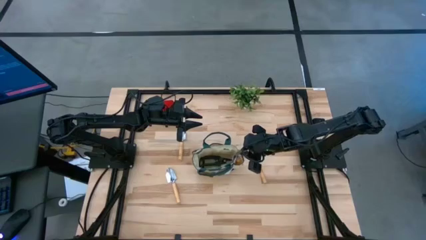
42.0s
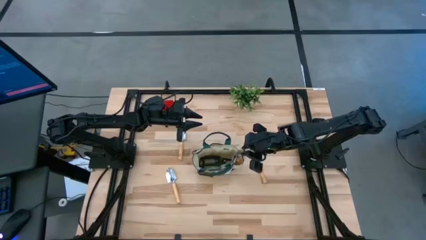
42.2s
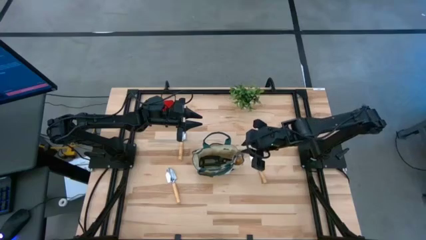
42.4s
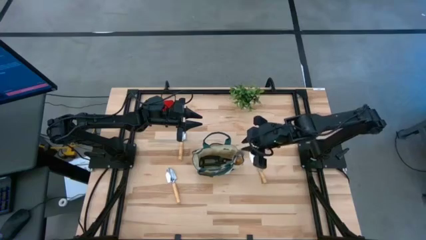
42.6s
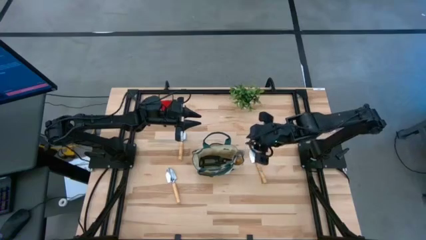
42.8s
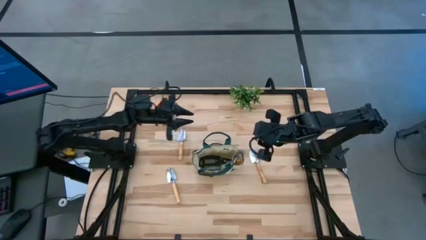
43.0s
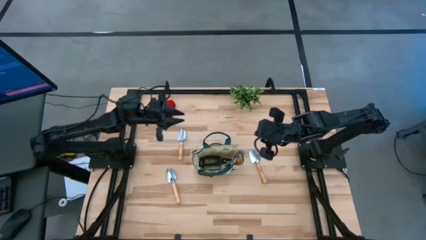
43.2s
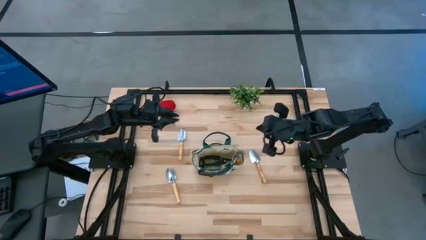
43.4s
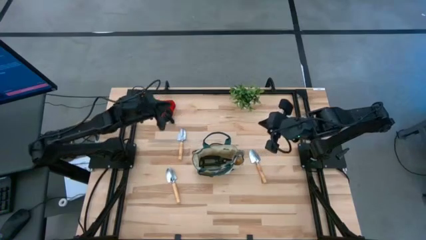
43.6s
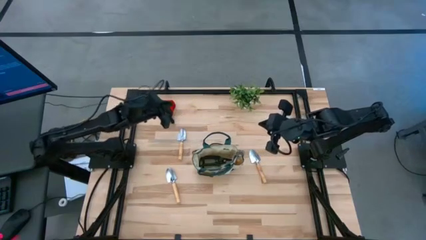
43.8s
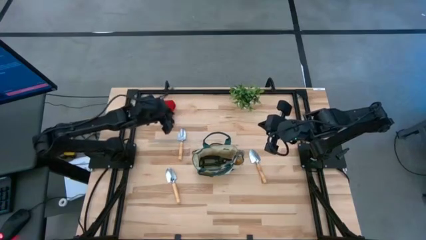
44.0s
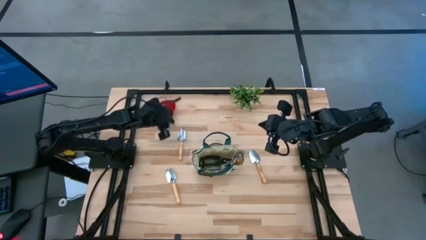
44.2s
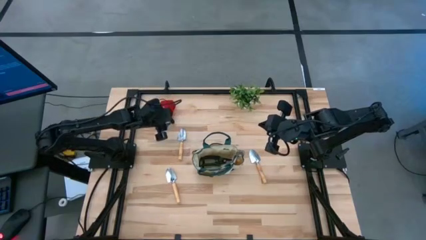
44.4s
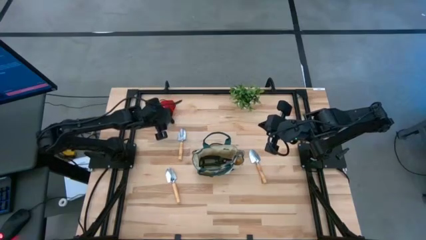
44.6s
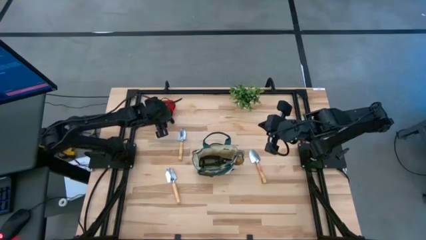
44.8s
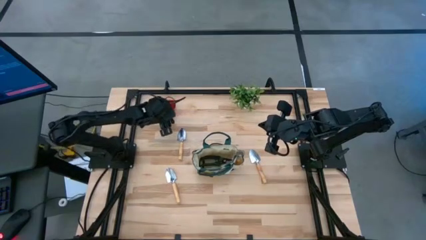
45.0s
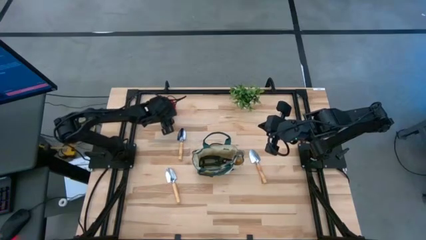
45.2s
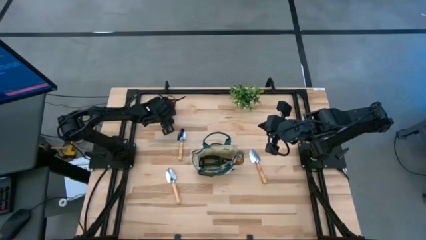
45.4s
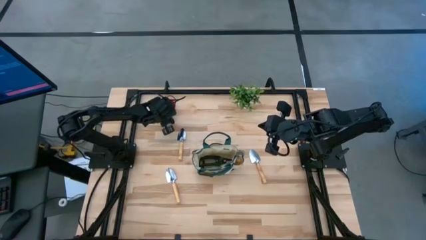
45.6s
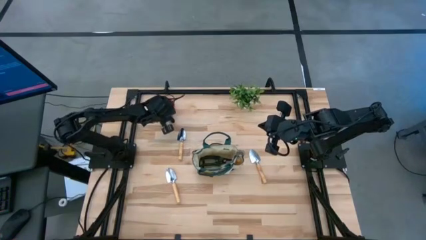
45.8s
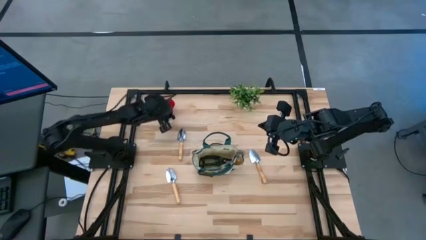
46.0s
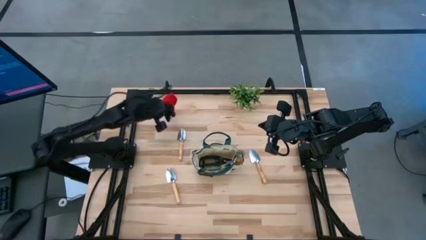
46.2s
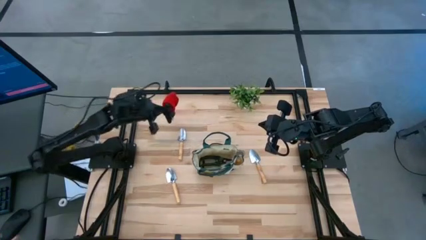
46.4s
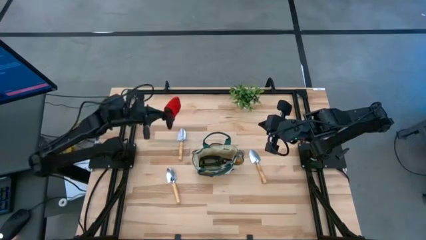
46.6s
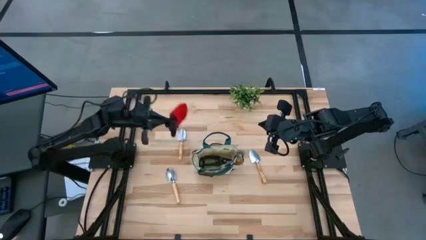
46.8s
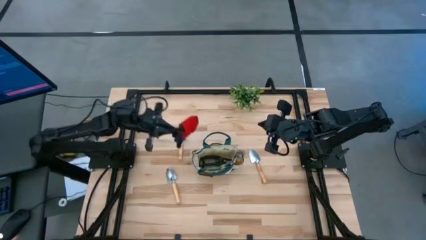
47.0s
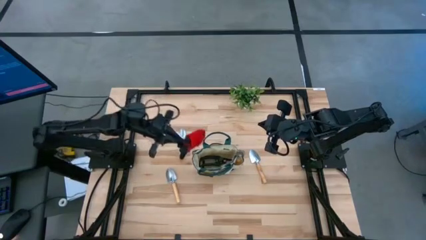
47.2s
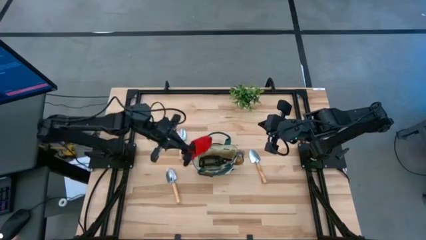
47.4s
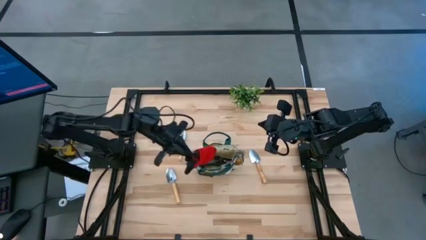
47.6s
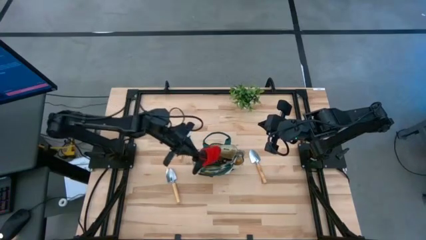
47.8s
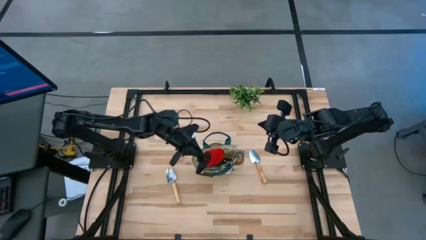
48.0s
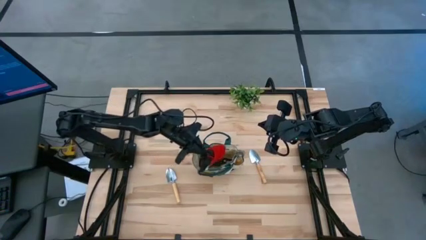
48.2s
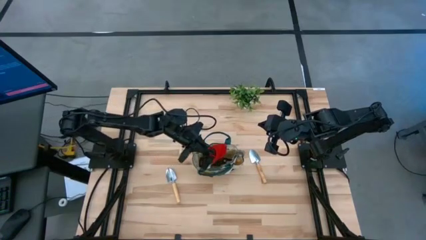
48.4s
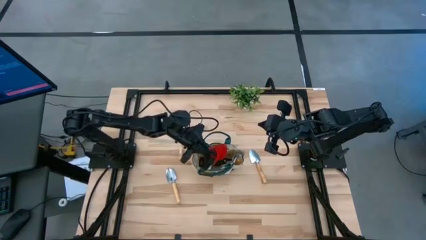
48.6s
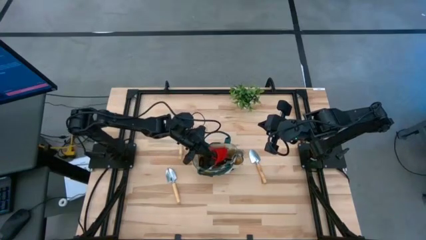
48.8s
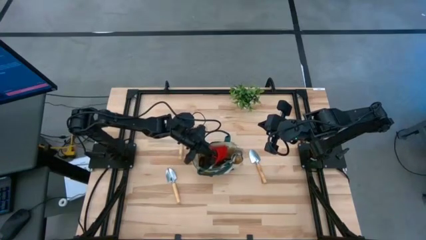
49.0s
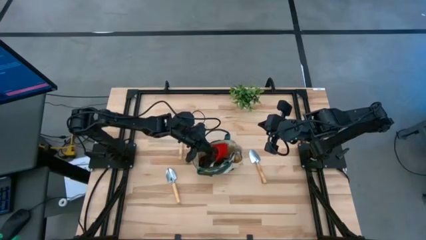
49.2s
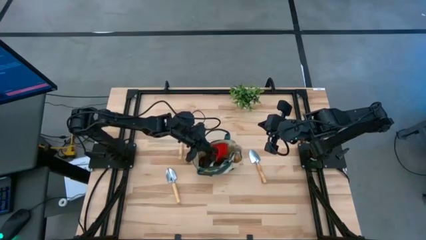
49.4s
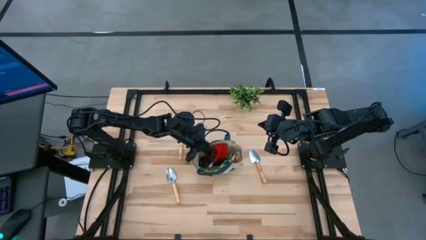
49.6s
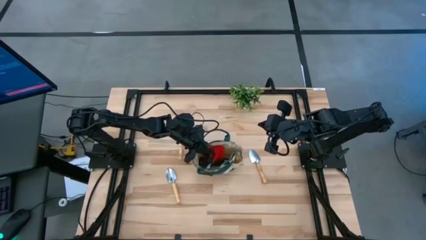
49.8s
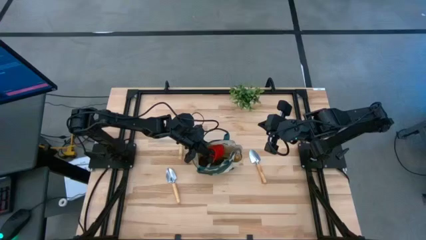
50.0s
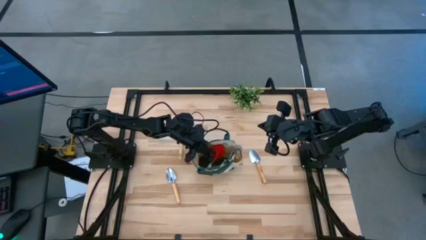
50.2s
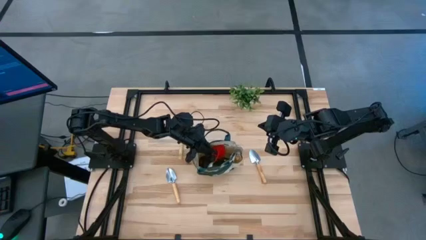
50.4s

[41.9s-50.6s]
Task: Pick & Place Garden tools in Gardening bag
Put the red gloves into the gardening bag

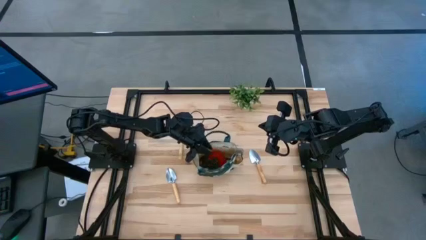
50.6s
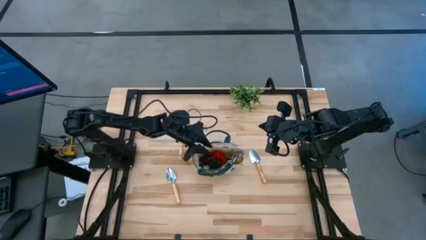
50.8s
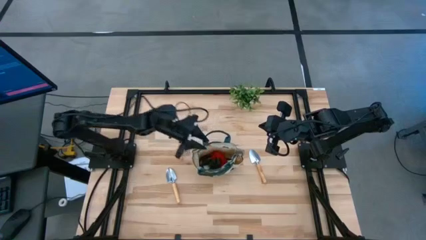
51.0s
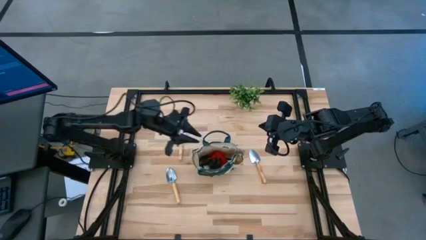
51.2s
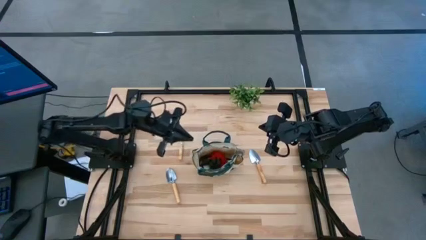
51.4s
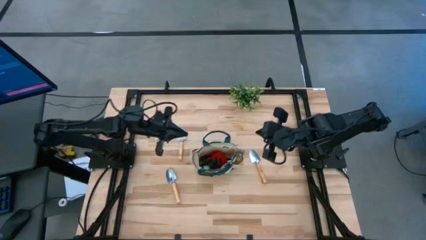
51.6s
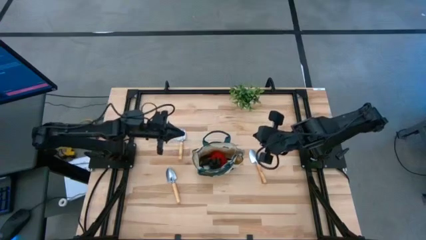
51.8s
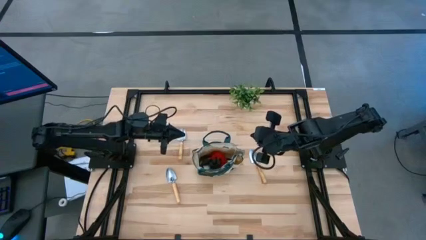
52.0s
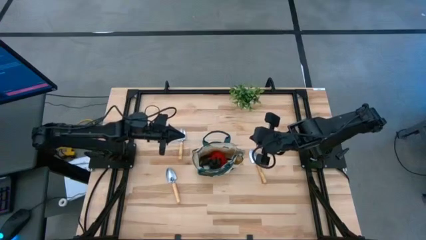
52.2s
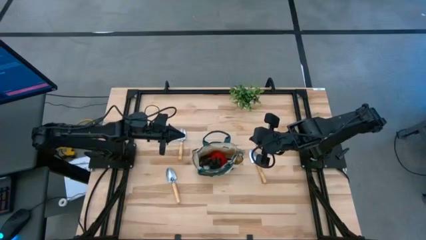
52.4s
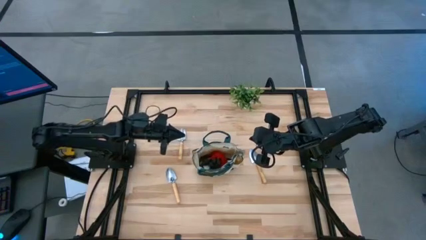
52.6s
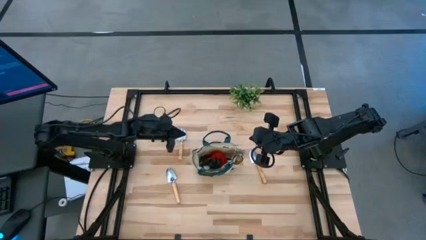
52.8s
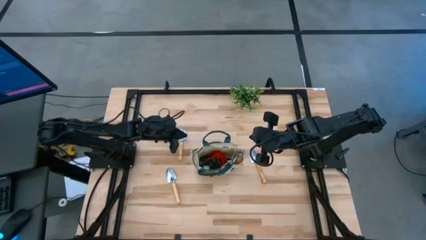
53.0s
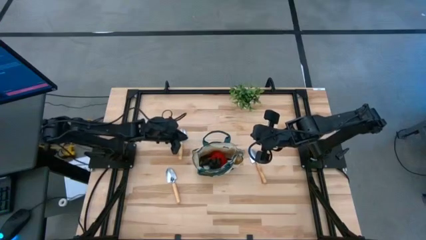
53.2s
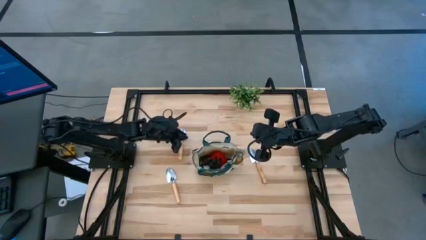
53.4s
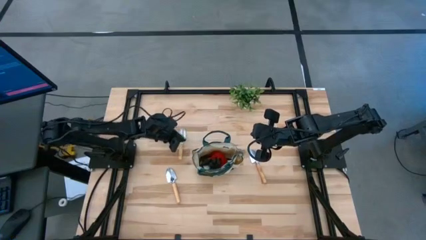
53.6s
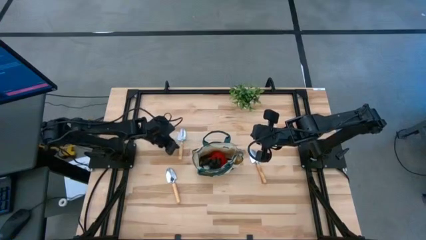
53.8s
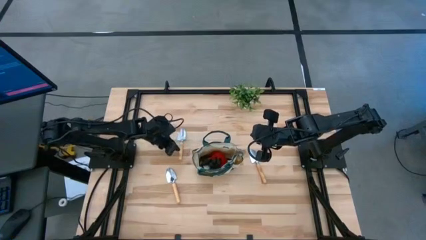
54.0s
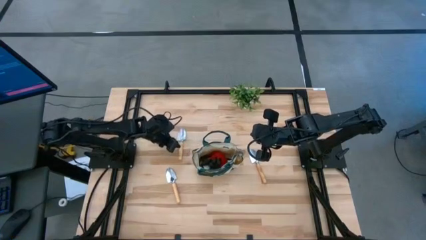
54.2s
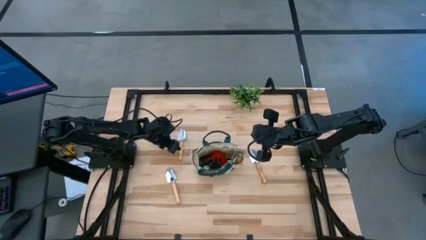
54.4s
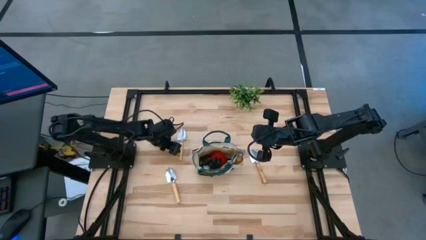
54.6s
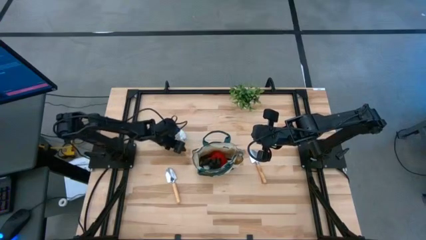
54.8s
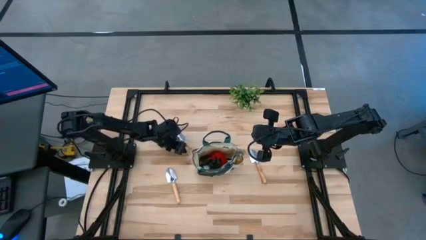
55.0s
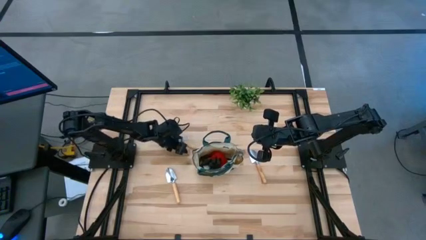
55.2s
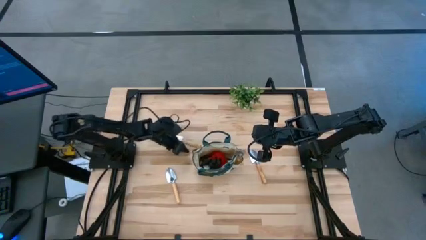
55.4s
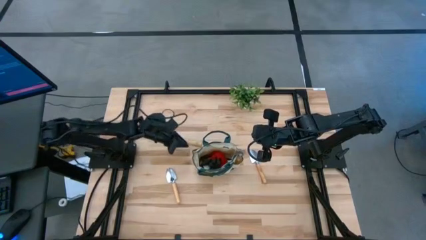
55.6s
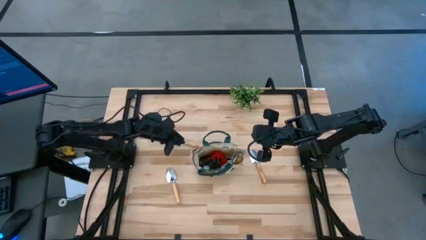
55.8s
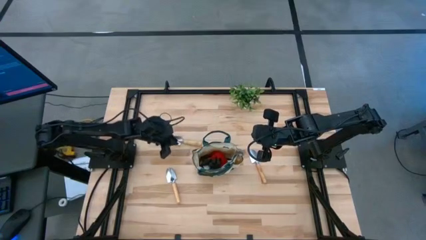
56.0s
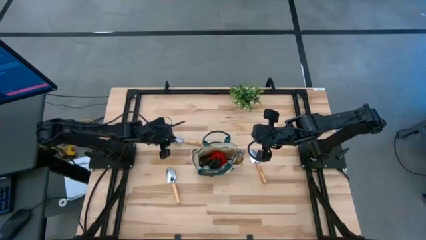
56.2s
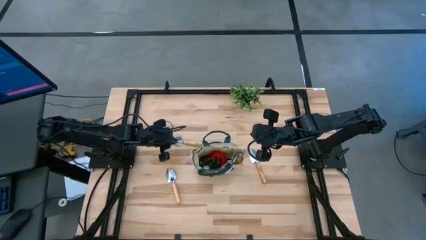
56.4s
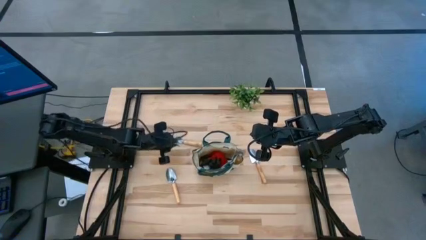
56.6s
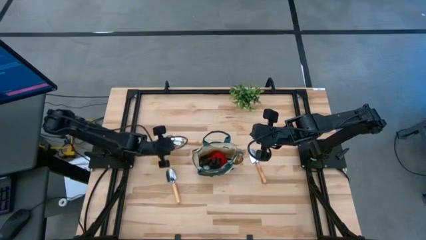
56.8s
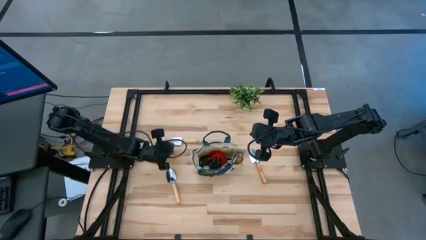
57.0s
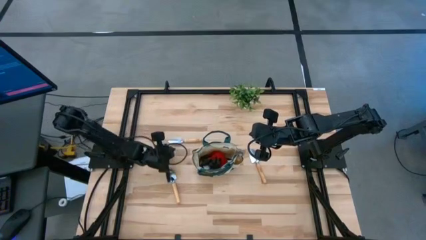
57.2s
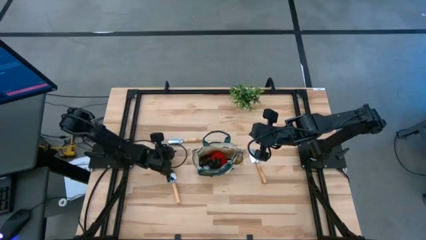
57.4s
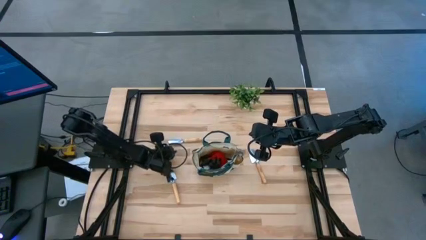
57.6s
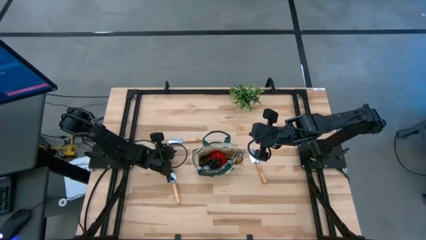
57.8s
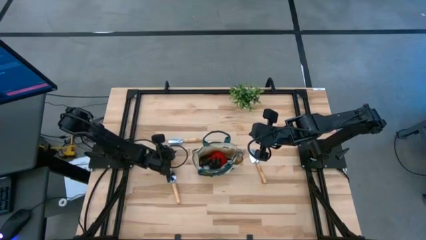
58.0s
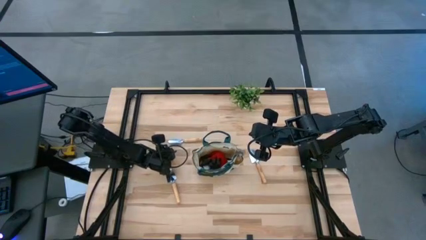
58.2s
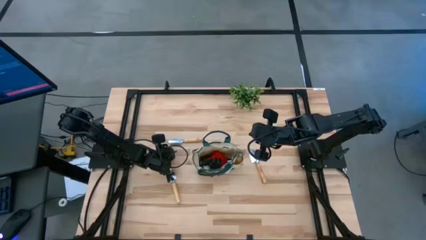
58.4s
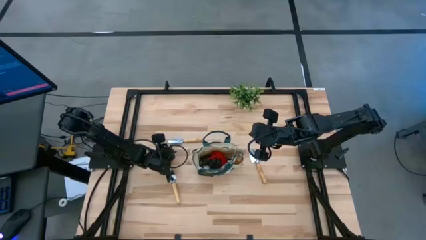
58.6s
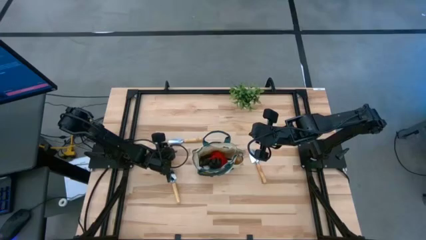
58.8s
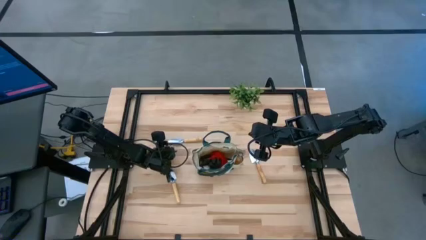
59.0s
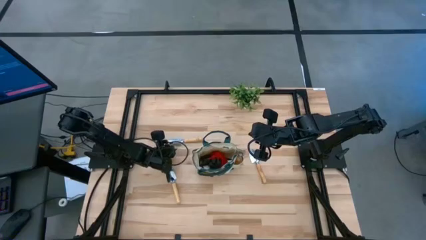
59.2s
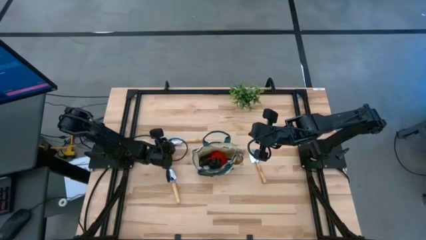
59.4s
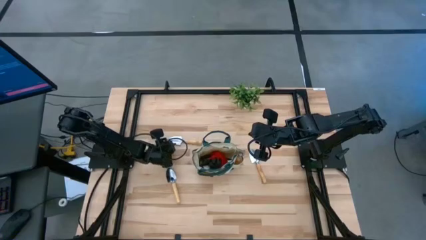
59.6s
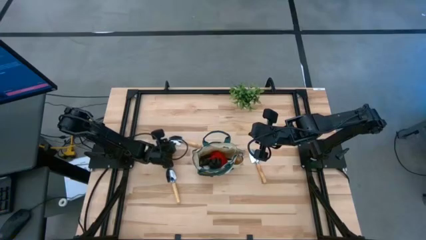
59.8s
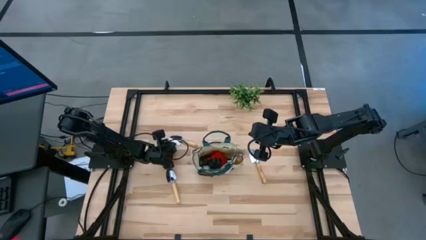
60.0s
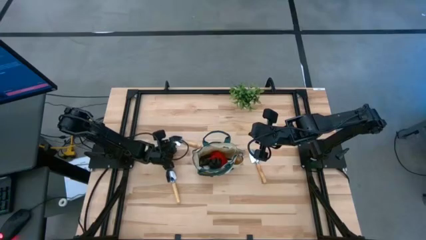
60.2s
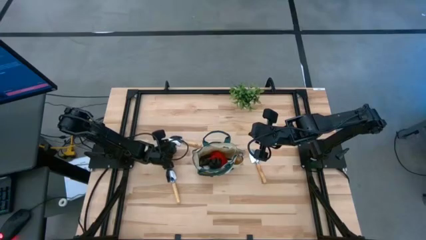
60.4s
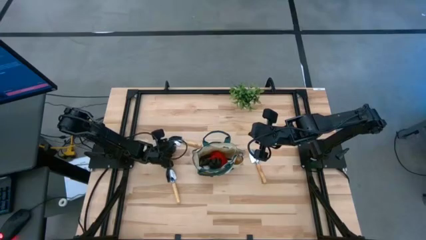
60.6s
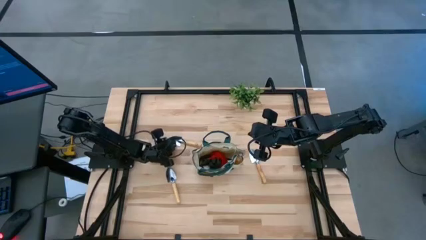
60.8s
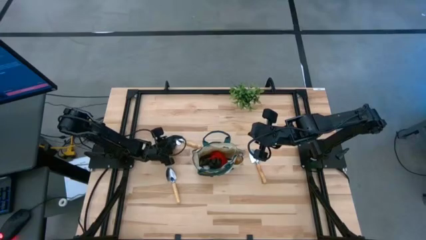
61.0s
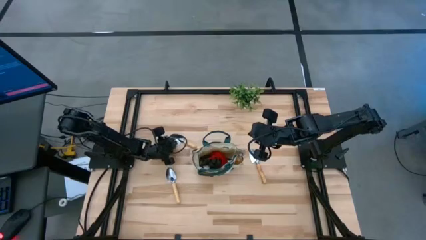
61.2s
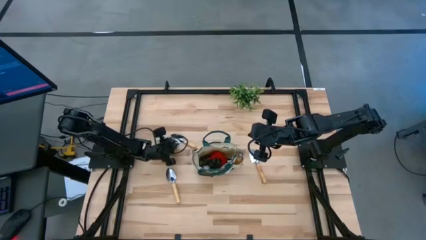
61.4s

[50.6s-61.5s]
Put the brown trowel into the gardening bag
